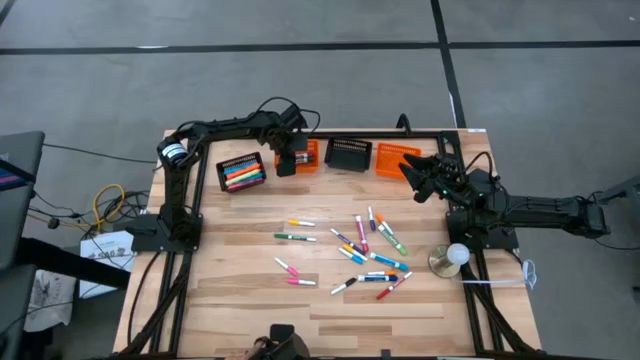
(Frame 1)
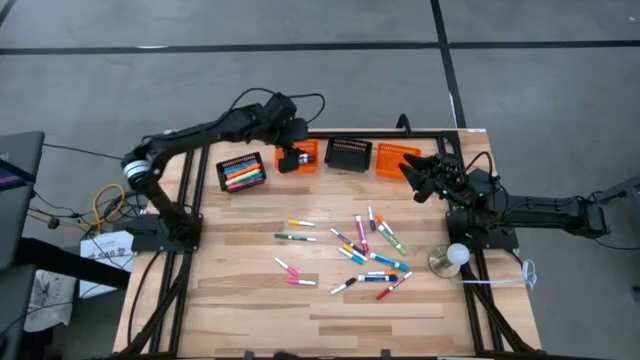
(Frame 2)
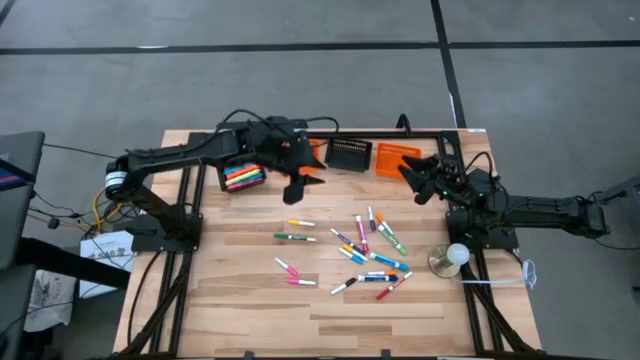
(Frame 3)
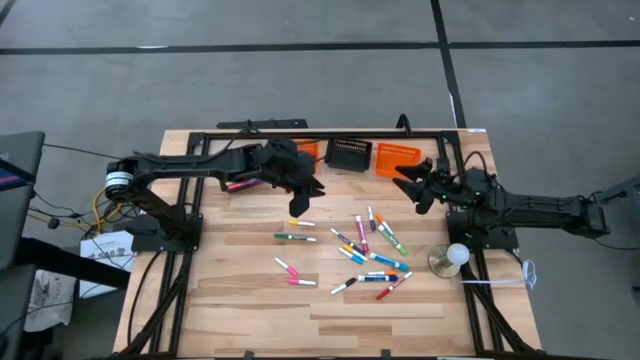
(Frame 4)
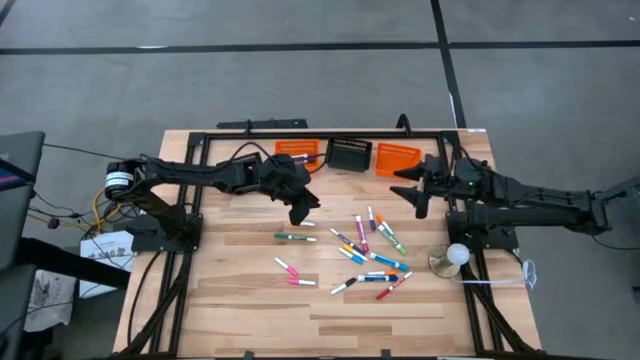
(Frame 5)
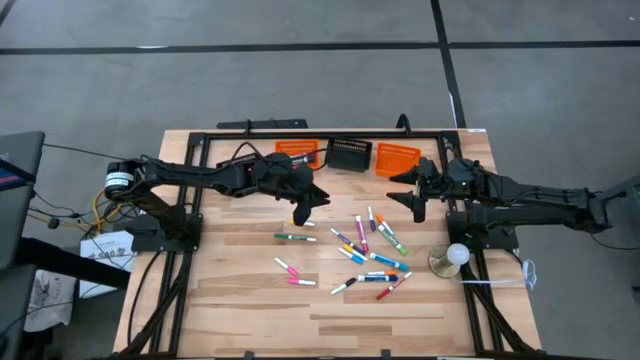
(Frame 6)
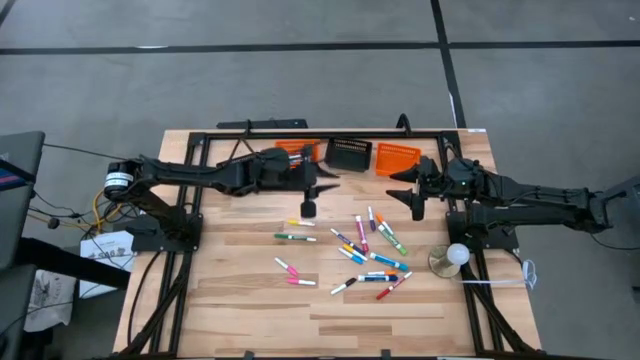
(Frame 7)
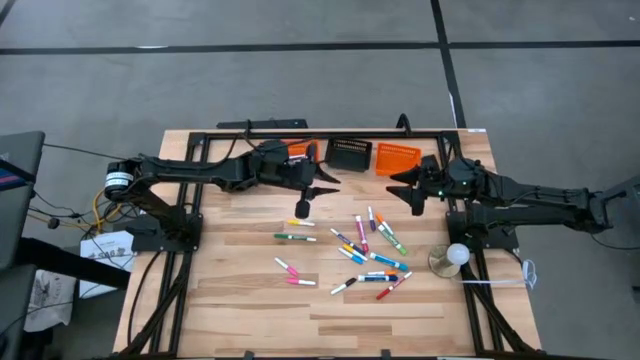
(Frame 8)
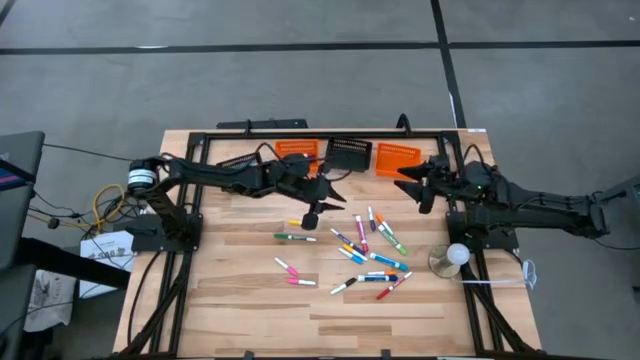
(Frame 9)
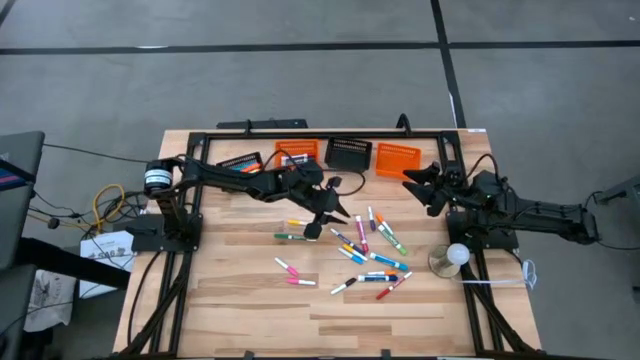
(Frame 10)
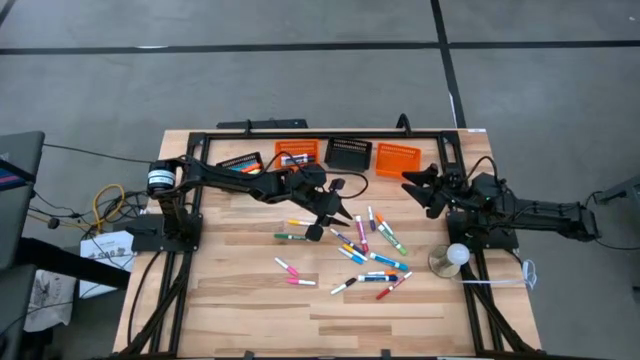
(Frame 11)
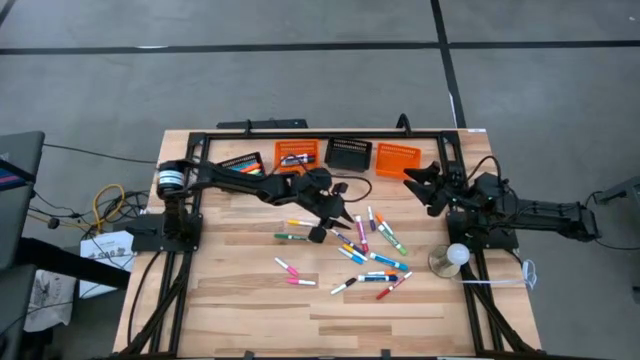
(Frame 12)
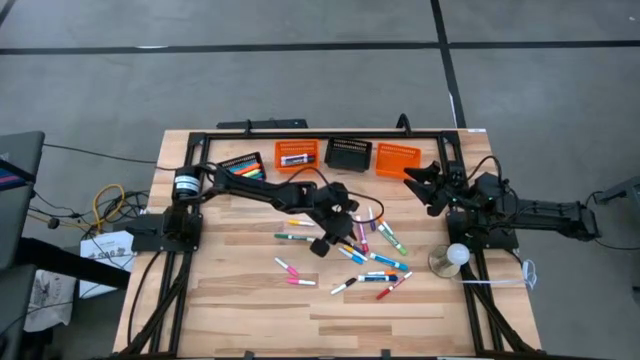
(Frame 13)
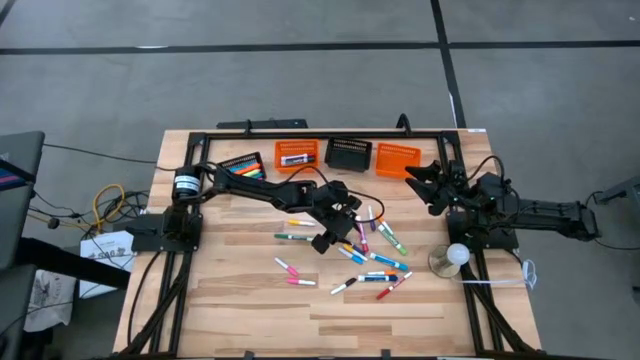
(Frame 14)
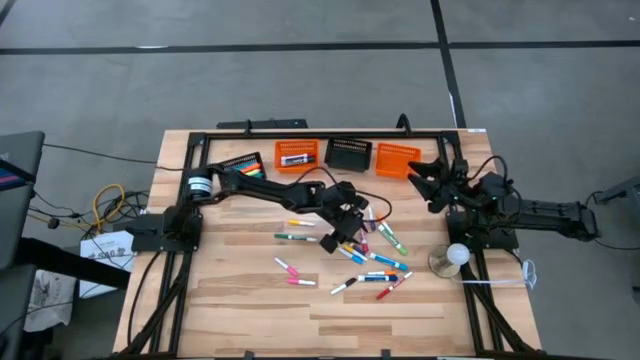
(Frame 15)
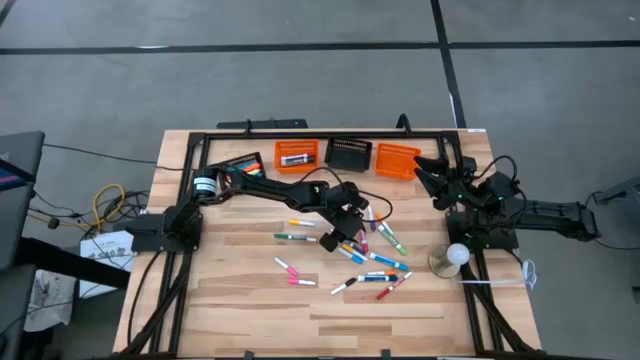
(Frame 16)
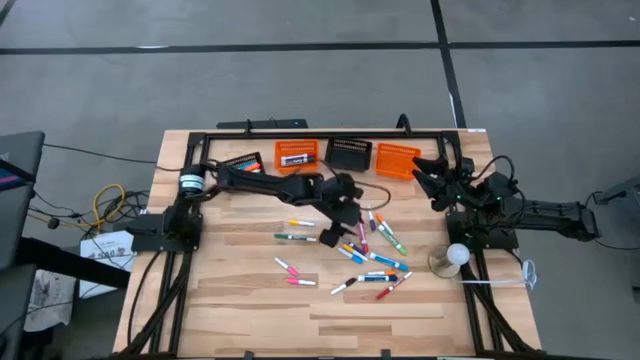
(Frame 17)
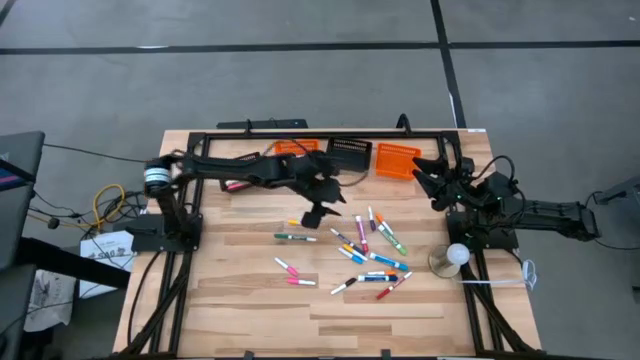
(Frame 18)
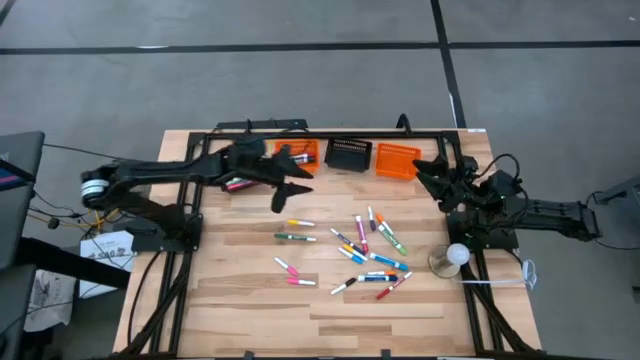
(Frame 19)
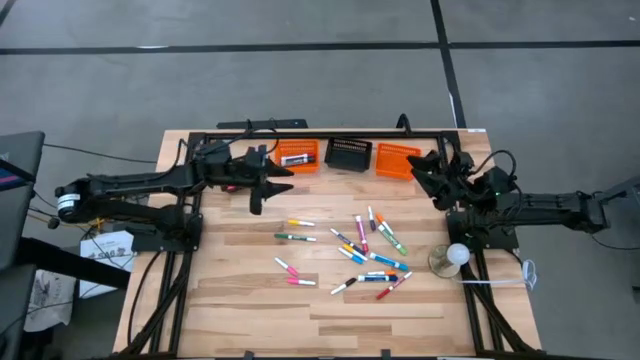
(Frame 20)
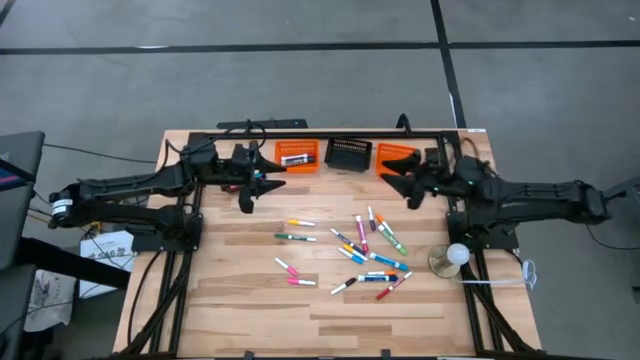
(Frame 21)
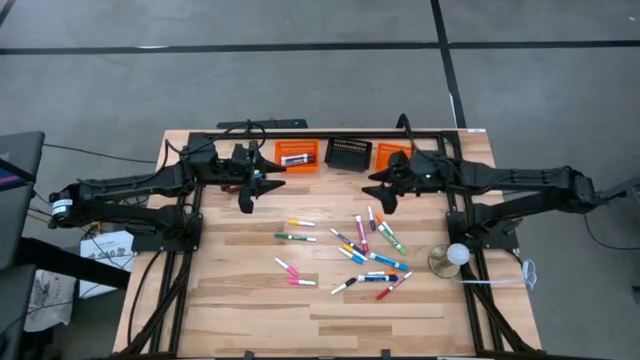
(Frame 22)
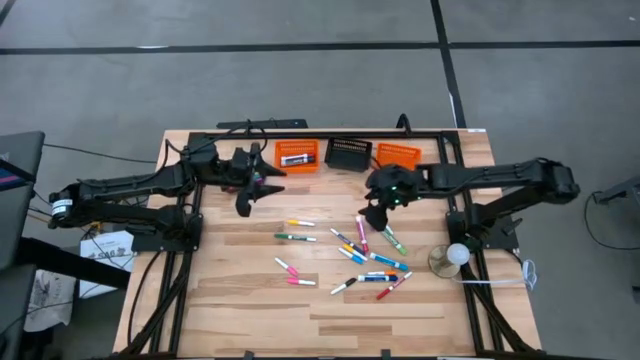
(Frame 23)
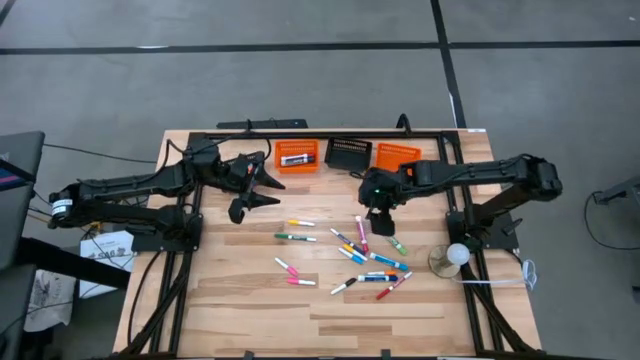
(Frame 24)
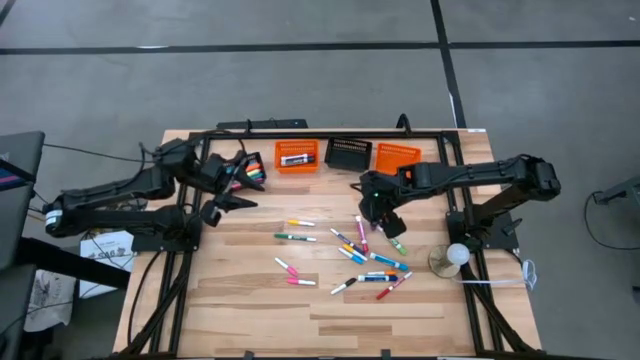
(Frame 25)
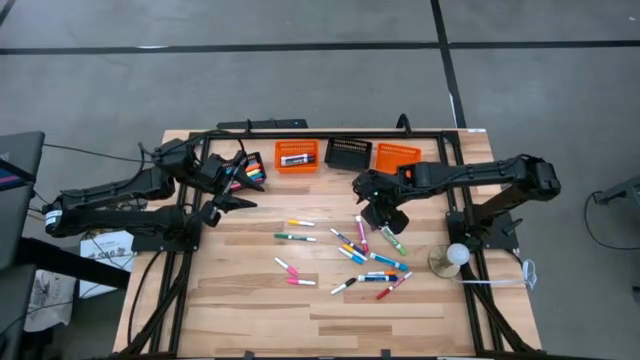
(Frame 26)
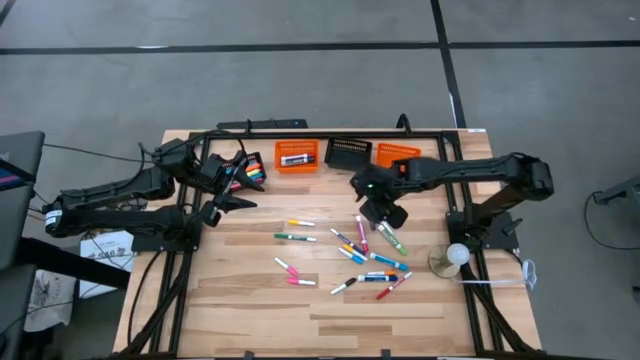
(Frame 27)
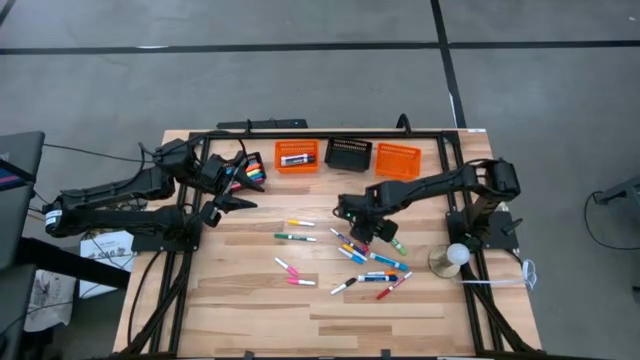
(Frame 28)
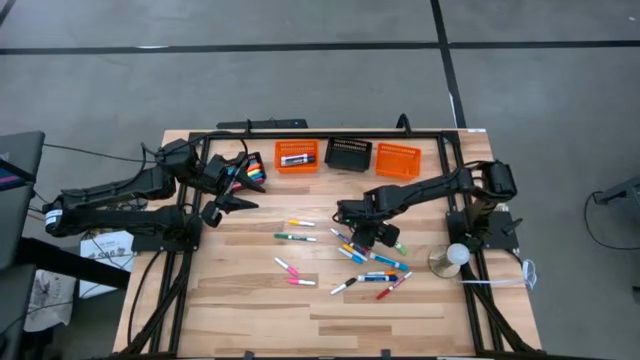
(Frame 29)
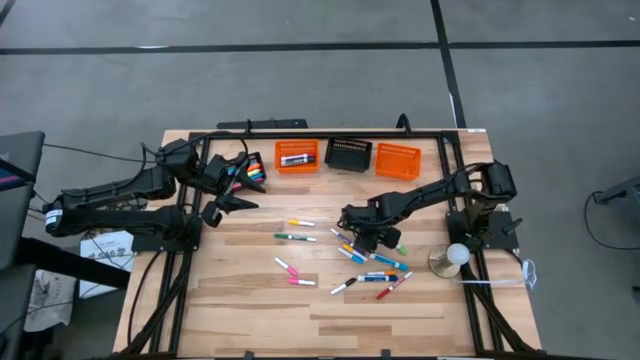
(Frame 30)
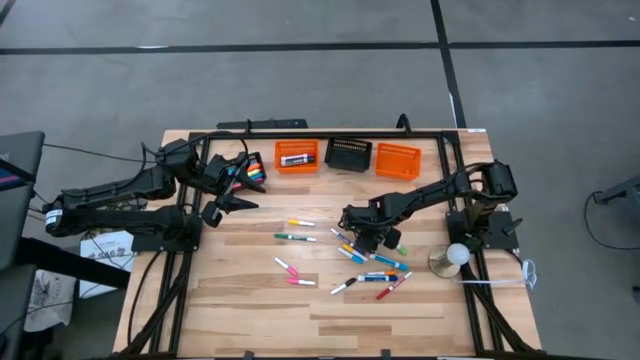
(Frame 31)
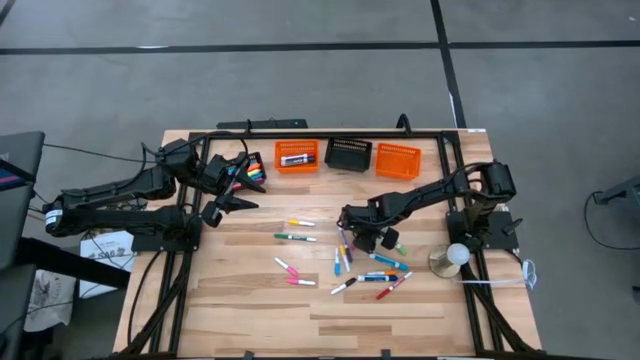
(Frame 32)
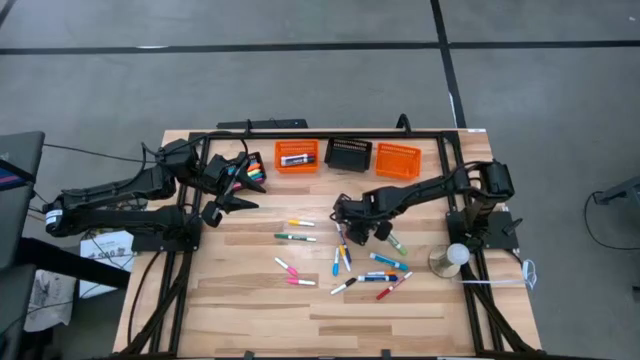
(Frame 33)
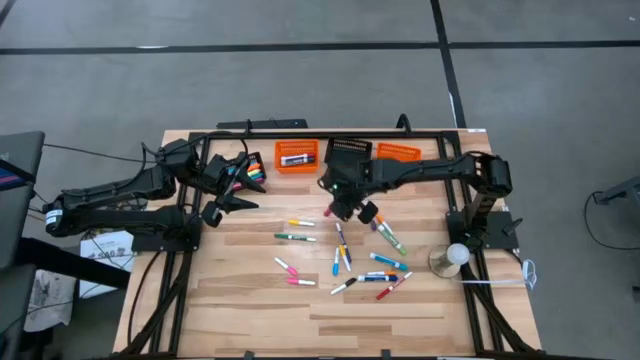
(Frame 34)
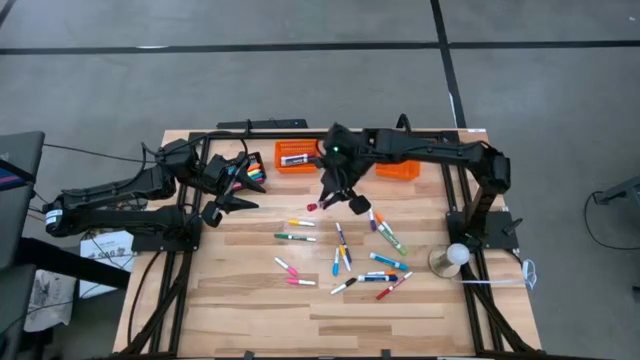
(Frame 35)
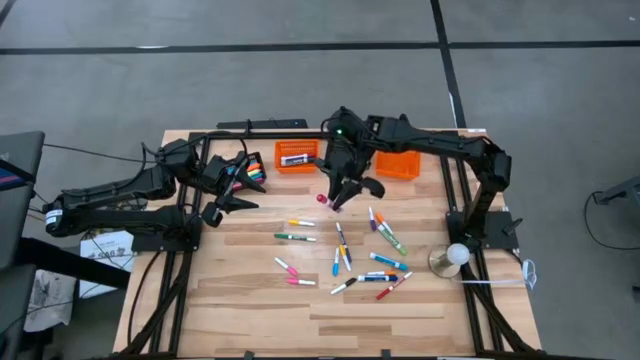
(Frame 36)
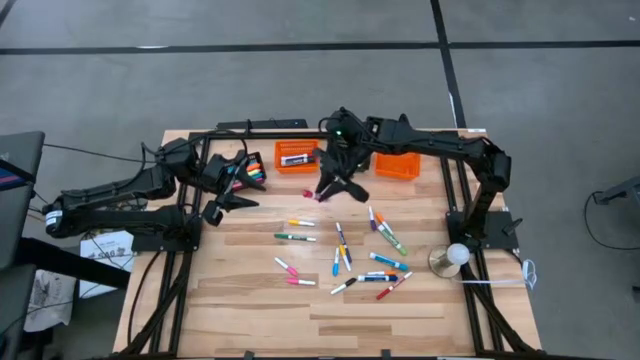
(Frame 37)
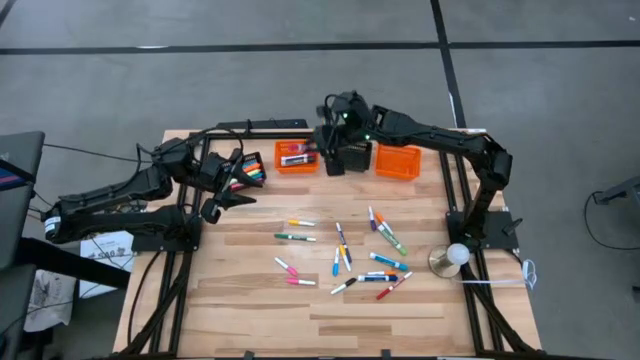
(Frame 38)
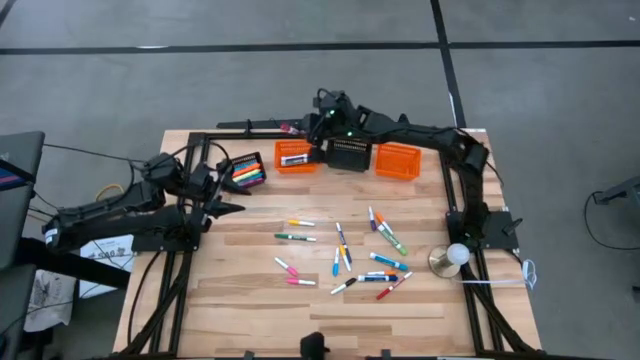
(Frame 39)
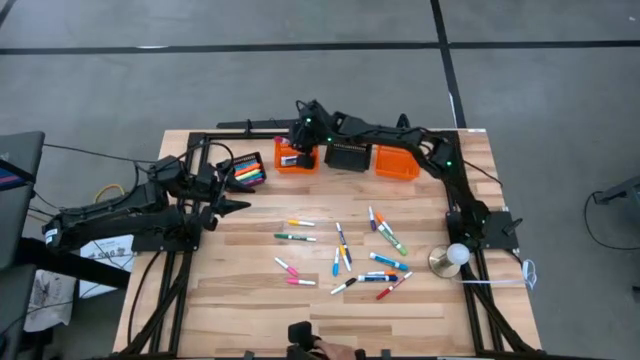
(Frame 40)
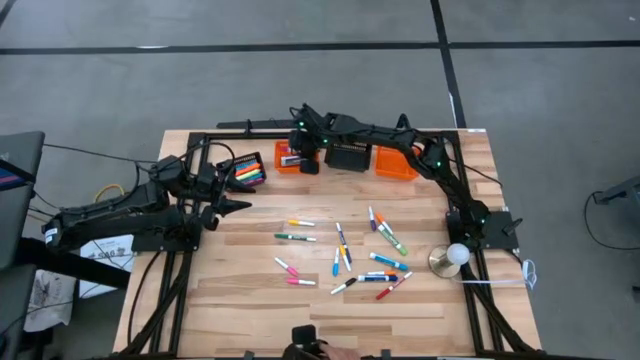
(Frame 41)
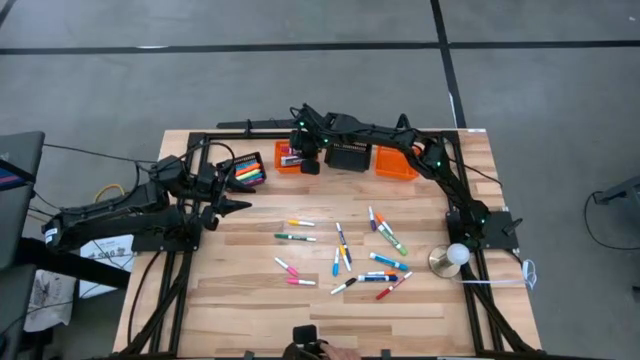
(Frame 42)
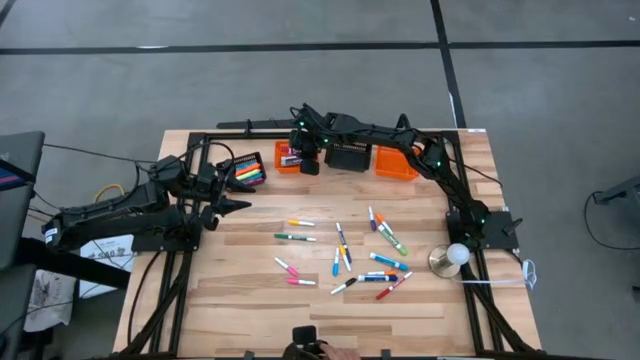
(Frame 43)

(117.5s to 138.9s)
Task: Pick & Place Markers
Put the large pink marker pen into the left orange bin

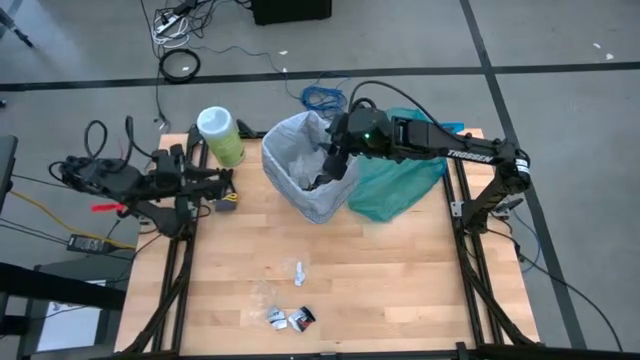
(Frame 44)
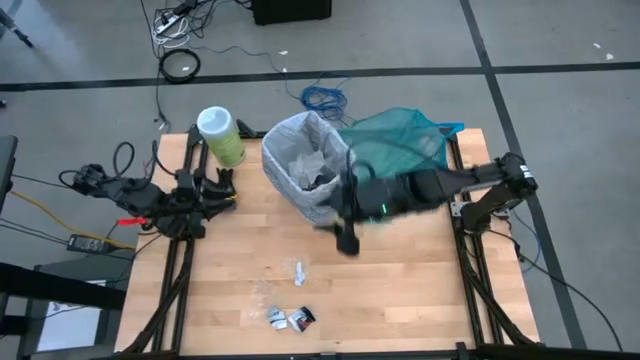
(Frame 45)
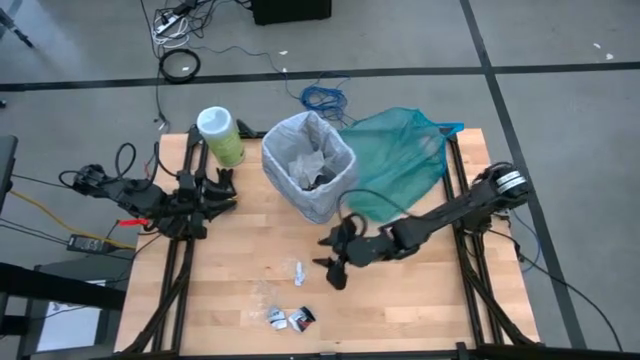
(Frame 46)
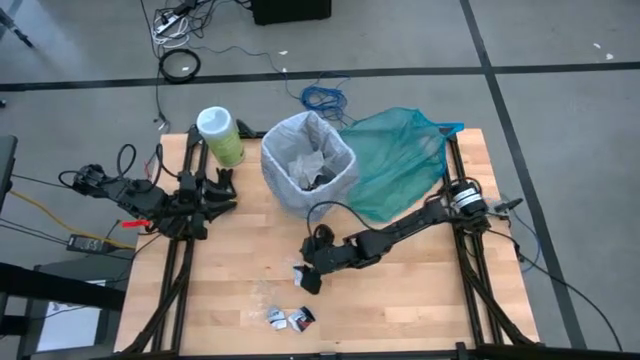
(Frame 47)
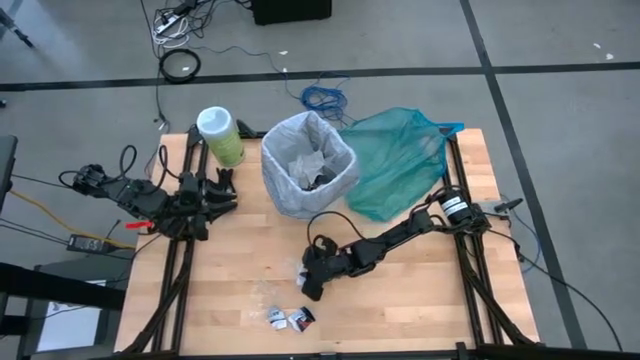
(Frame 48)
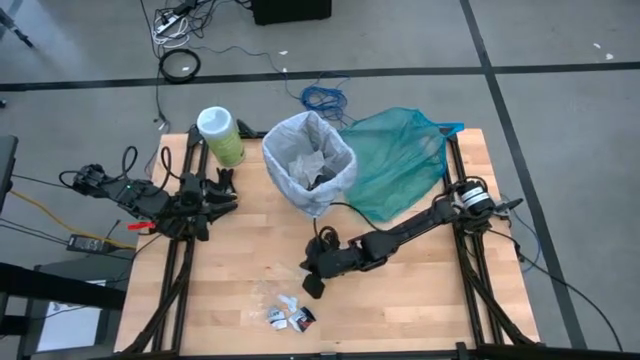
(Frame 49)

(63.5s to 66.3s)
Task: place trash/remove bag and relplace
Put the white paper into the trash bin
